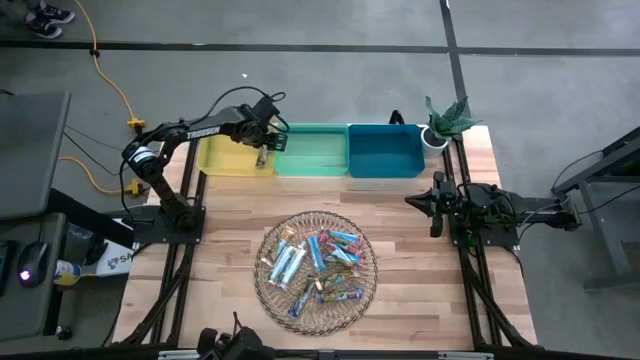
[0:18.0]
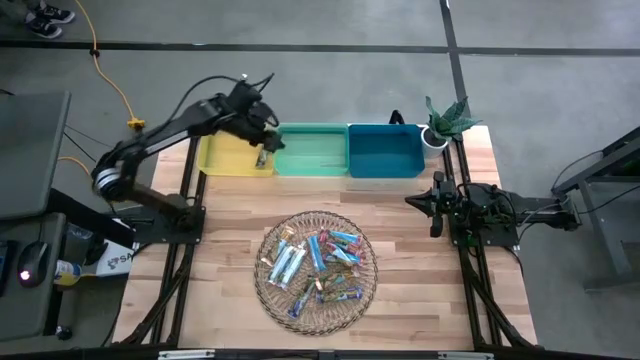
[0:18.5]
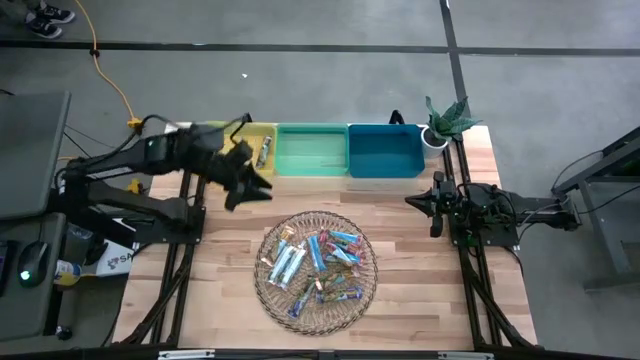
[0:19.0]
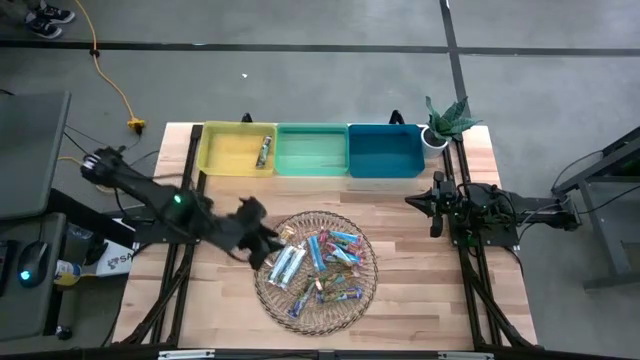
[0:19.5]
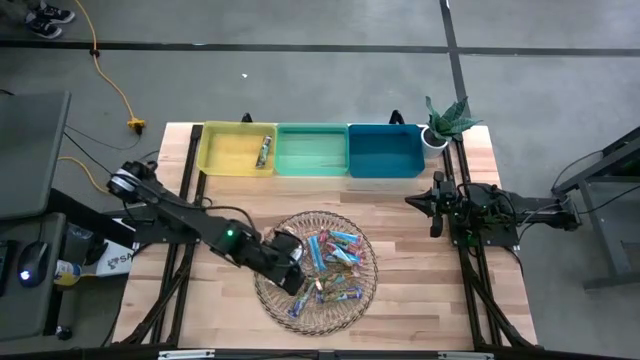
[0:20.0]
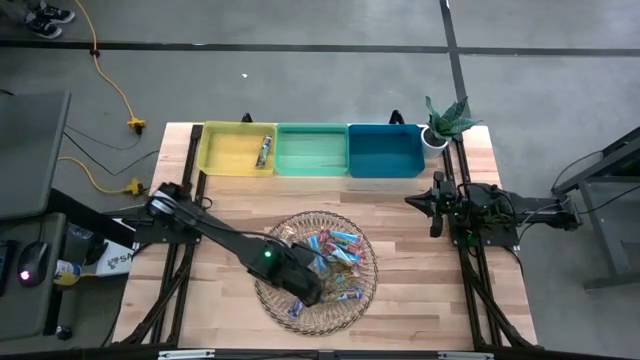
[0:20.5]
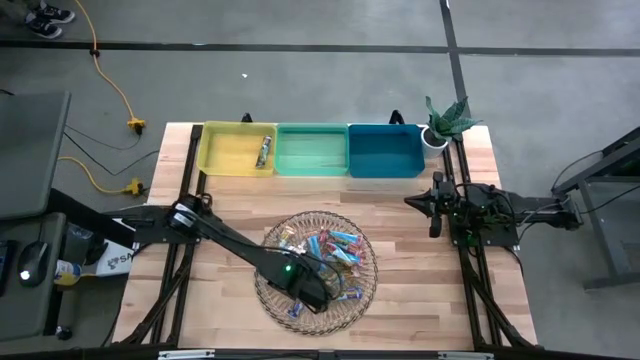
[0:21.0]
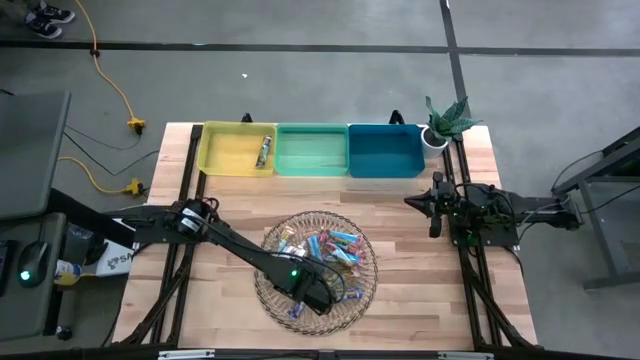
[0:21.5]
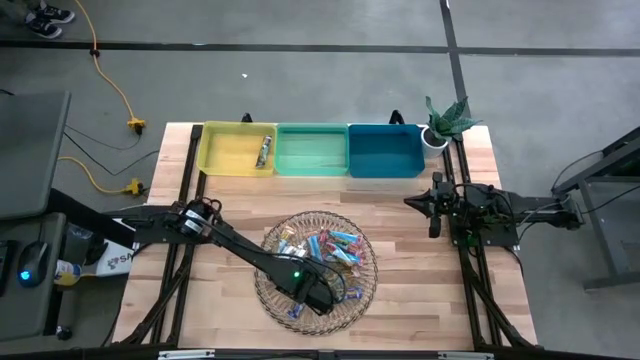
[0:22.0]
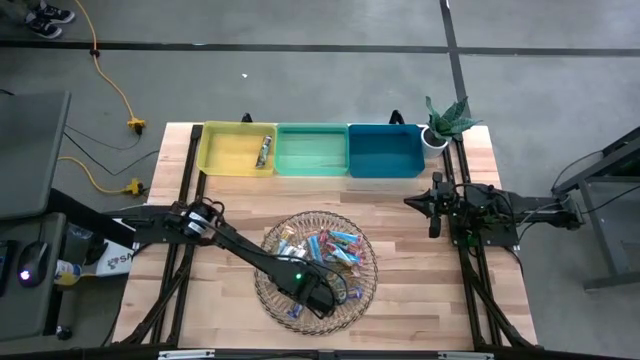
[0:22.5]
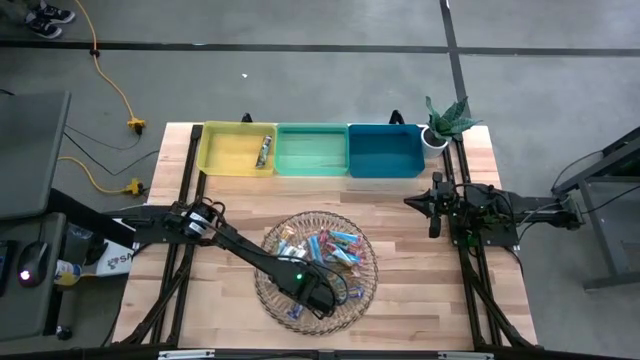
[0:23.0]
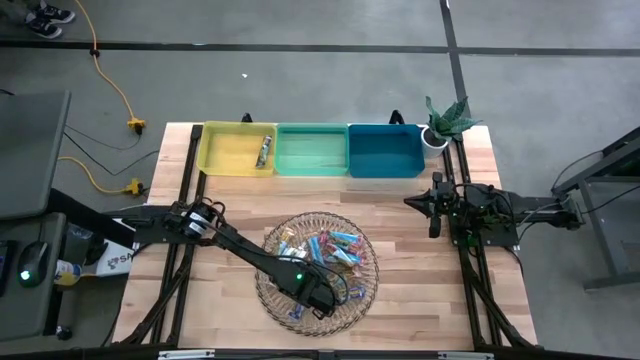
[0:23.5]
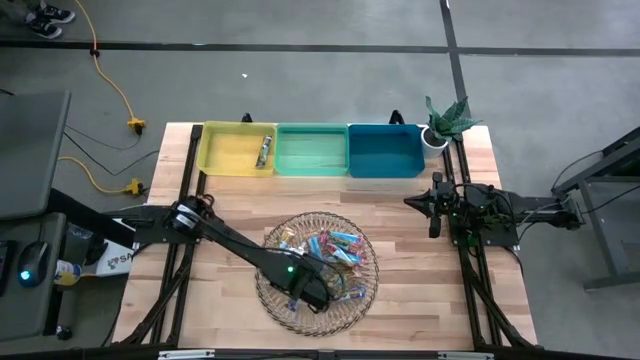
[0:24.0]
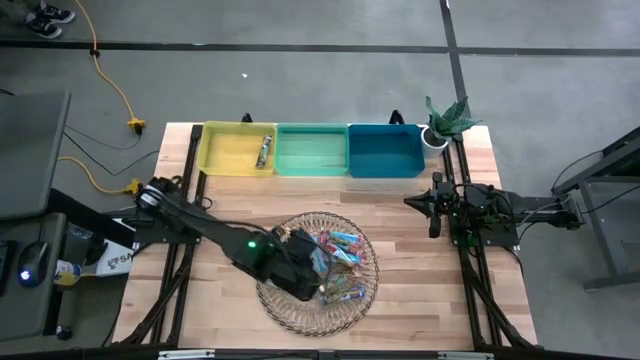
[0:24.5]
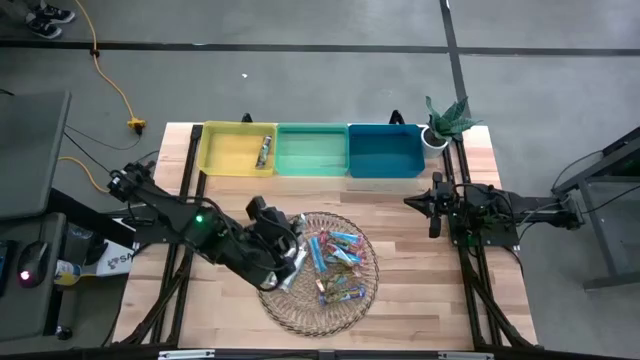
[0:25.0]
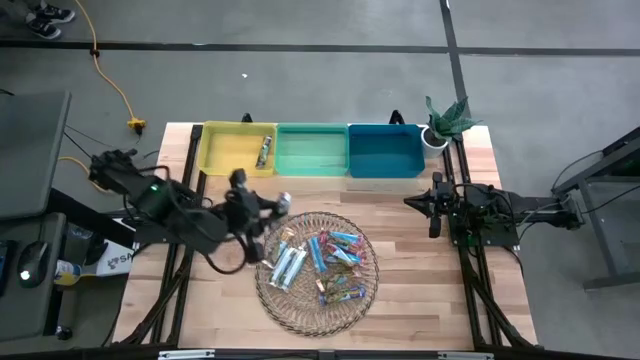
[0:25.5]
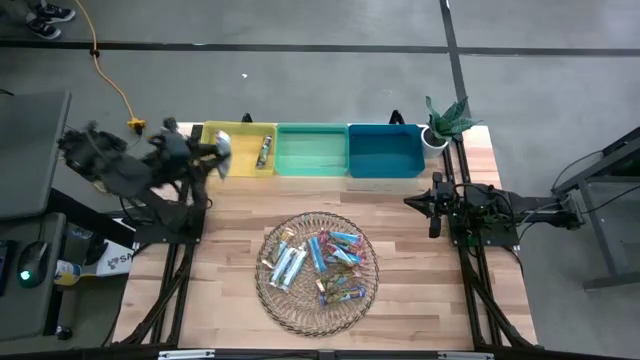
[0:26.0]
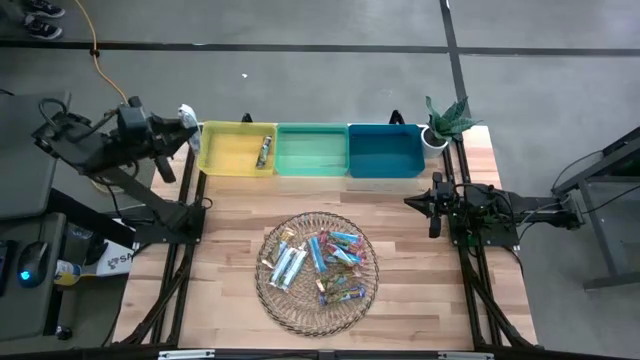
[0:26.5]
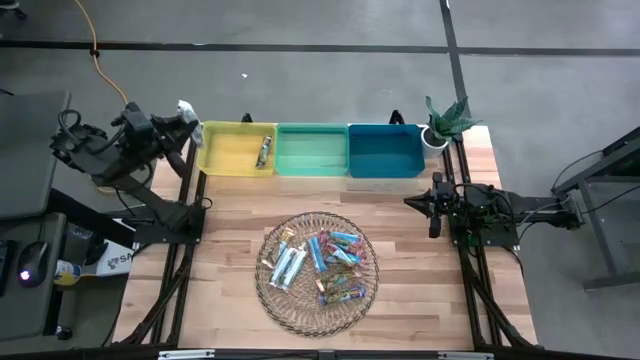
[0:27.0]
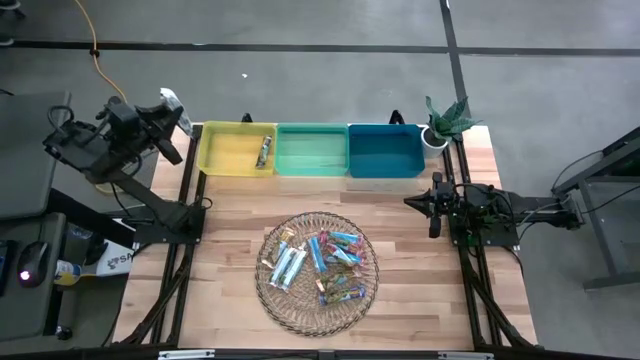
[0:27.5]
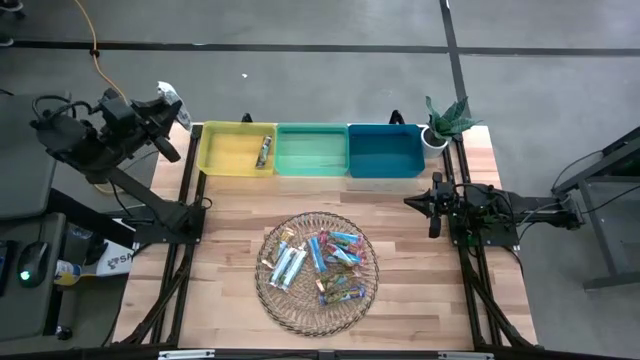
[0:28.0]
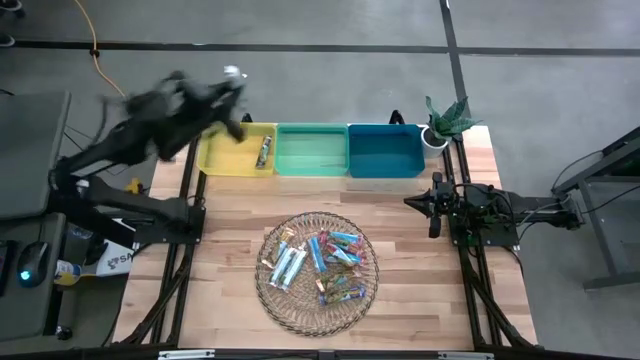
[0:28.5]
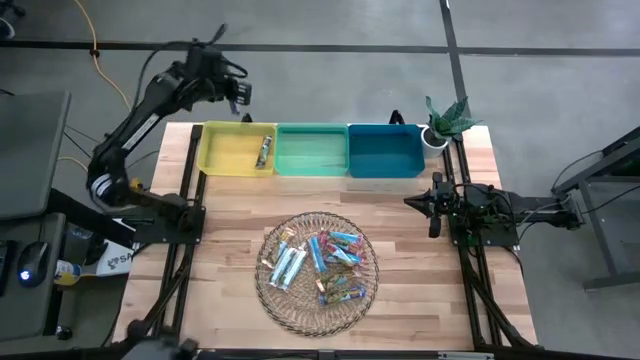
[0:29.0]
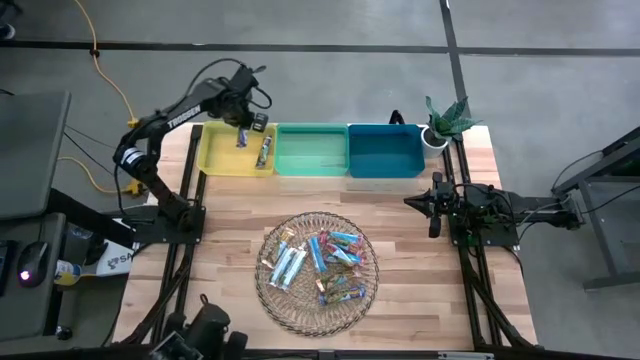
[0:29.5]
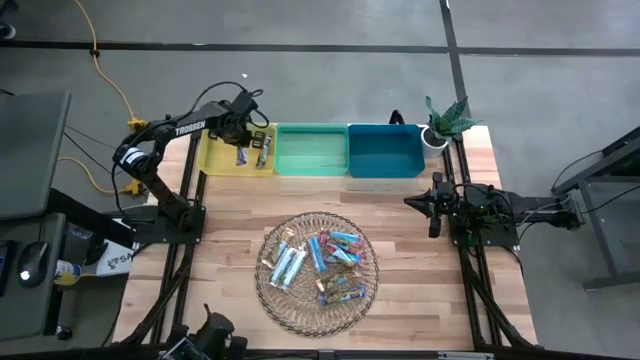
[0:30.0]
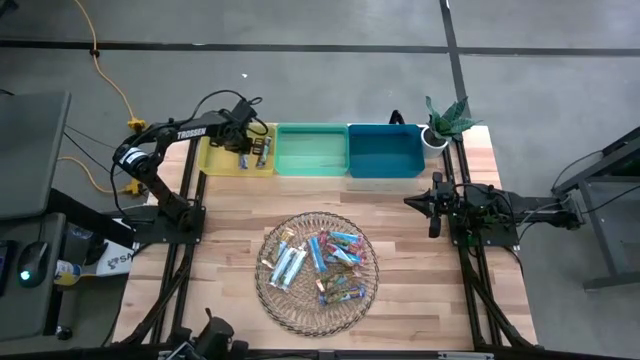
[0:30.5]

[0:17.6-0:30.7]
Task: Pick and place Granola Bars by type
Put the blue granola bar into the yellow bin

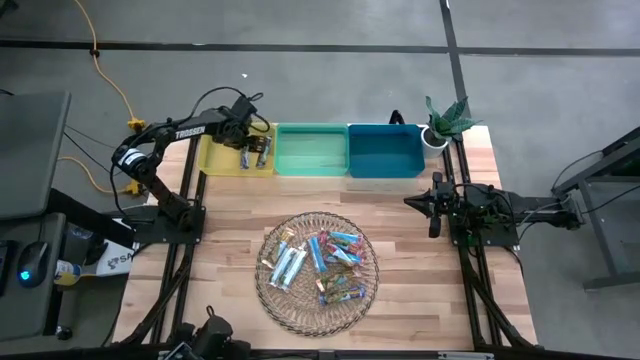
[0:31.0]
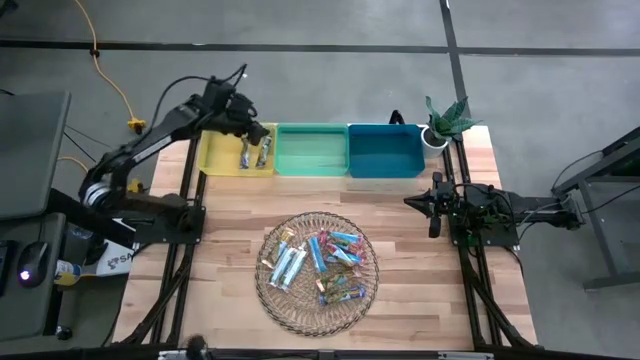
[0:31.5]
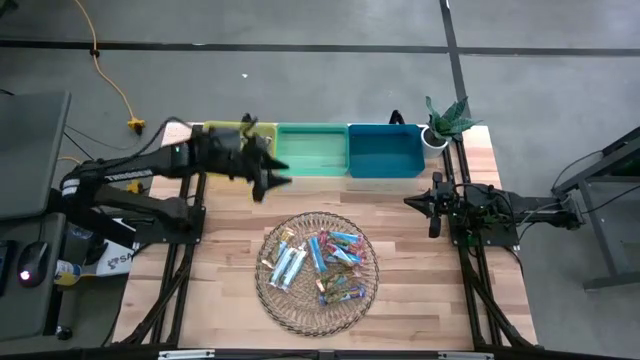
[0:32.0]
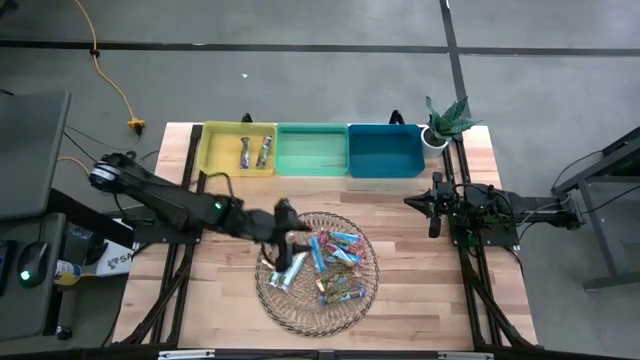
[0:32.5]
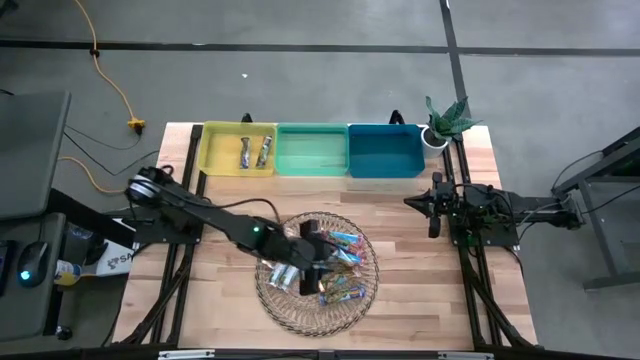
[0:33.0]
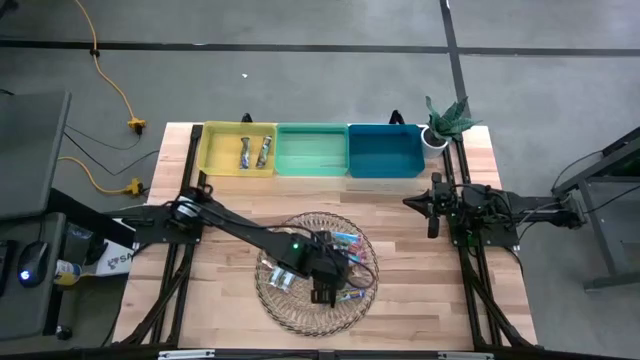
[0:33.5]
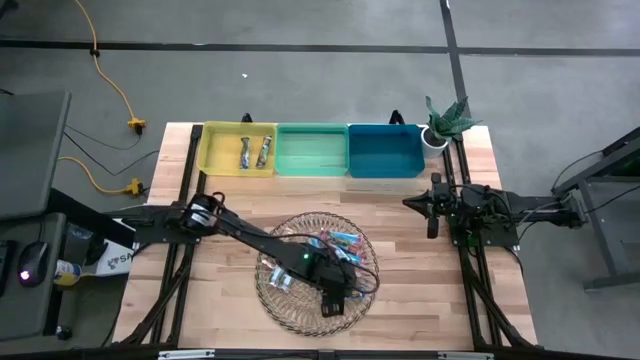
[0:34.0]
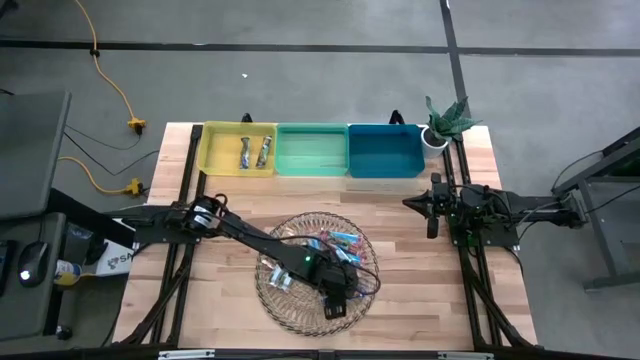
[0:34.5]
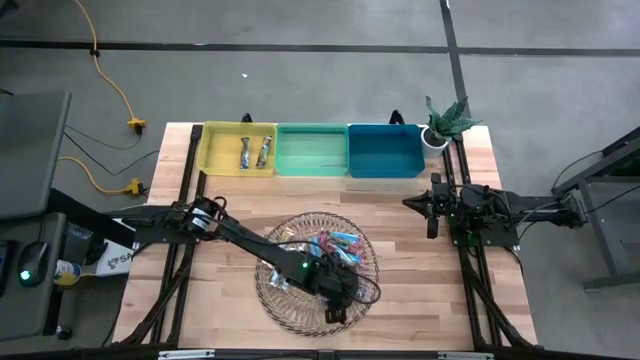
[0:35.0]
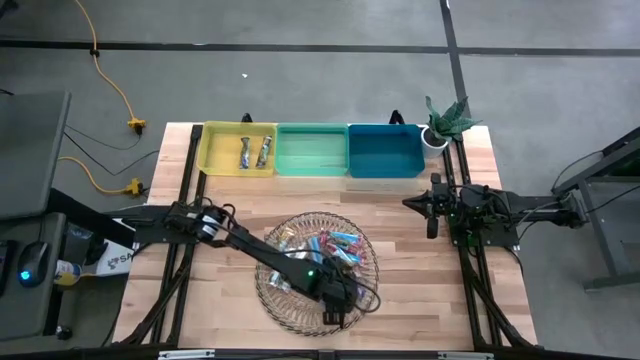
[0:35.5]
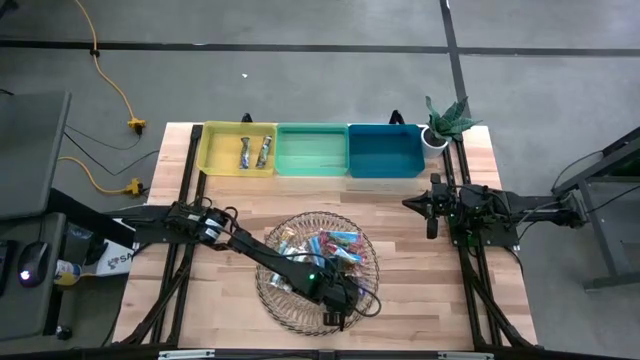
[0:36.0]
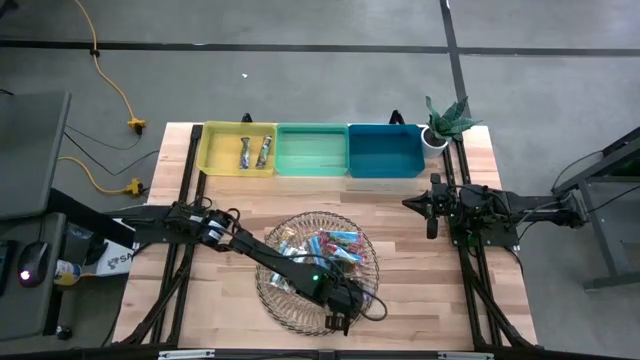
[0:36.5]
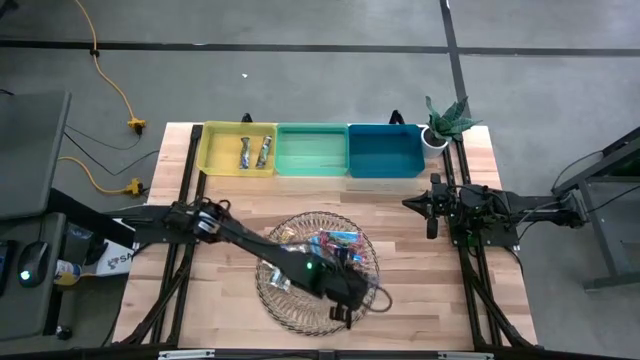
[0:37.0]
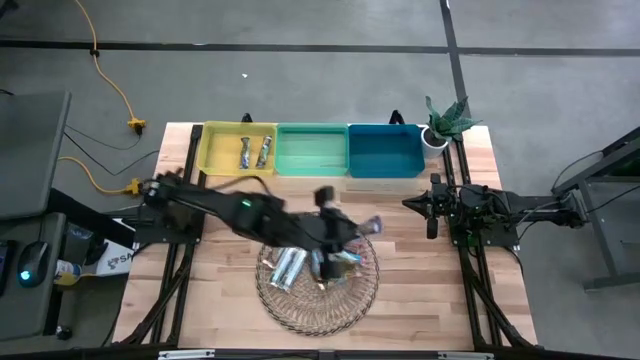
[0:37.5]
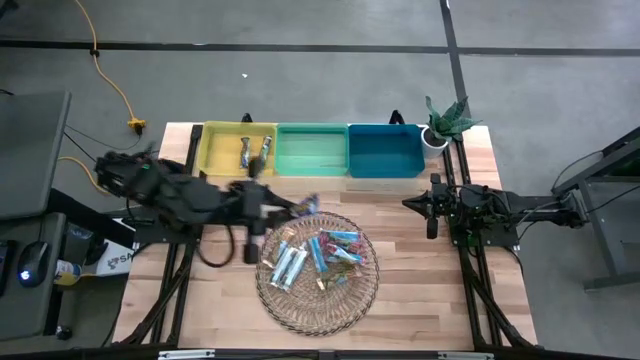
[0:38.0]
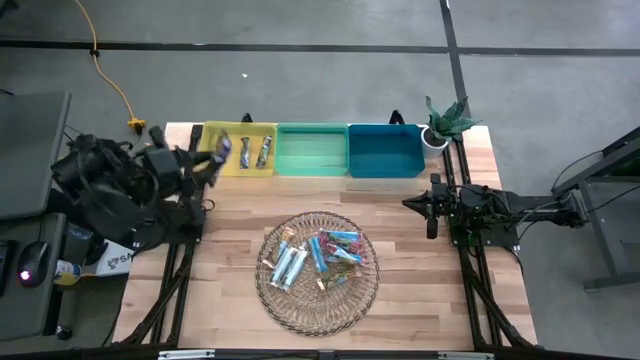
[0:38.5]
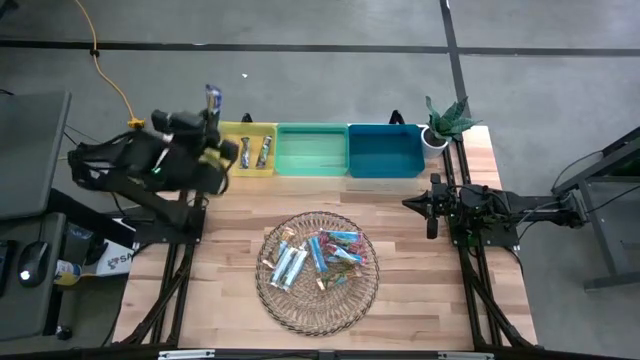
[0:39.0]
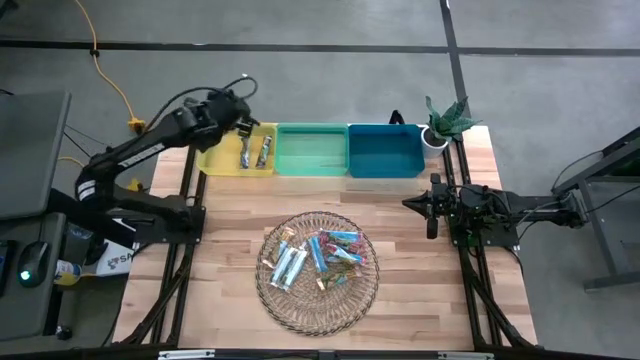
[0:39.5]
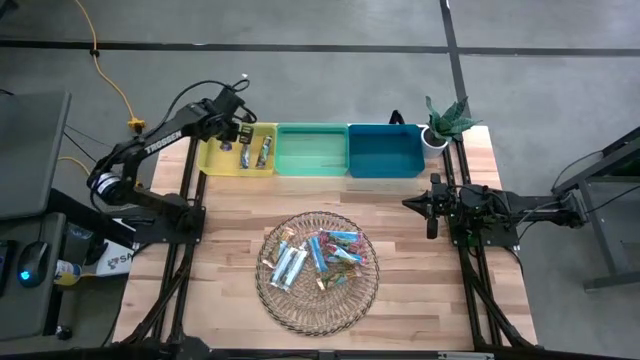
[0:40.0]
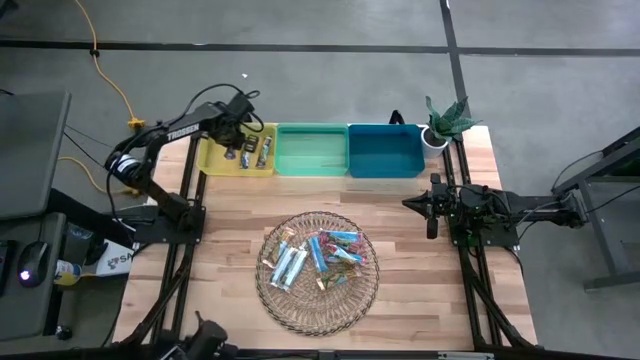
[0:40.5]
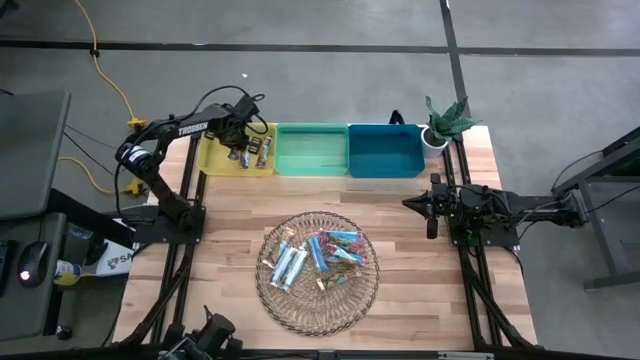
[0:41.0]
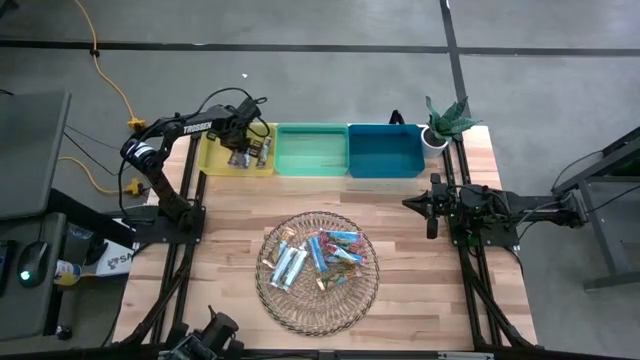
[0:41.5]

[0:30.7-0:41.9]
Put the blue granola bar into the yellow bin
